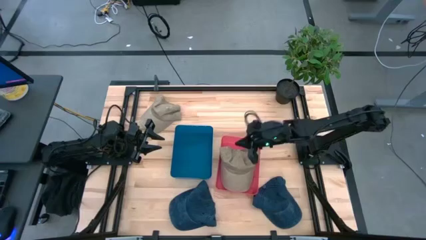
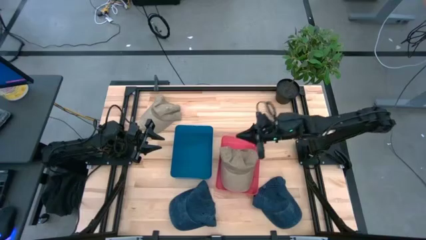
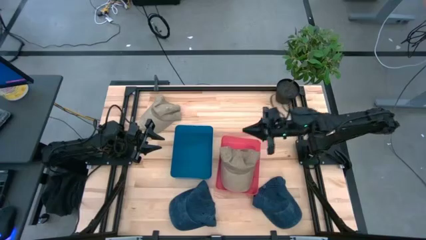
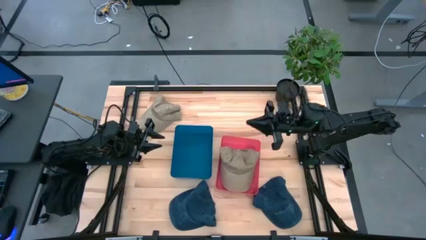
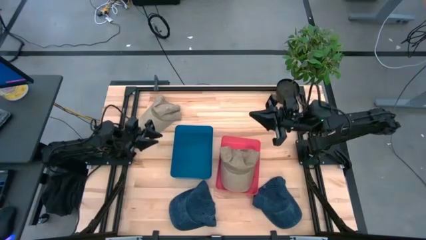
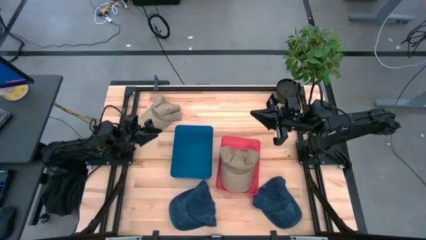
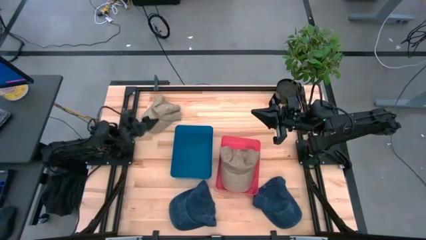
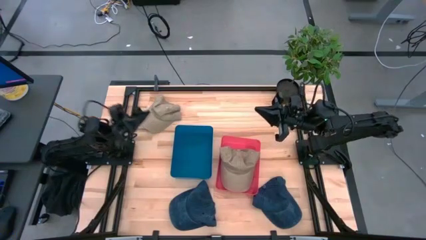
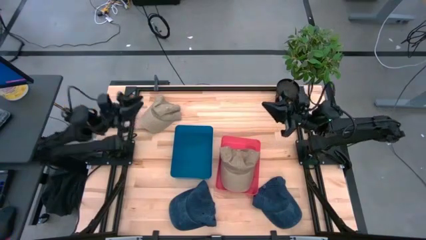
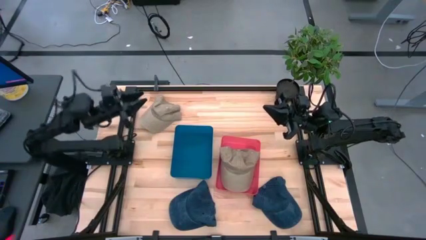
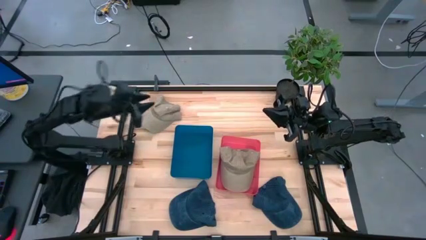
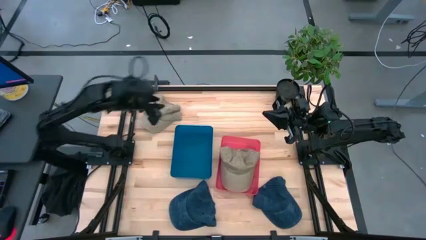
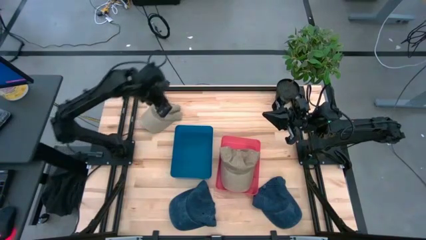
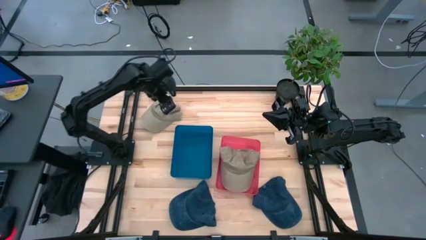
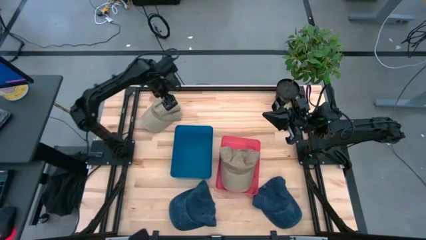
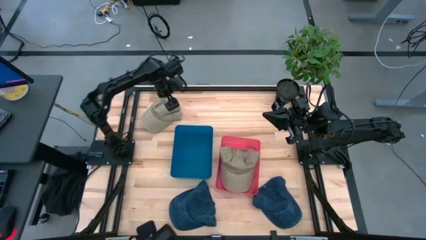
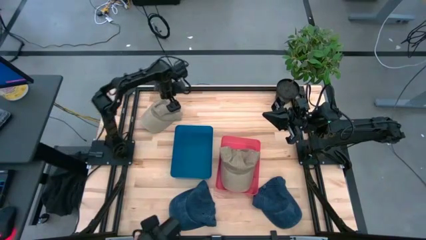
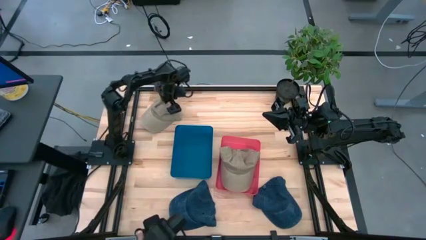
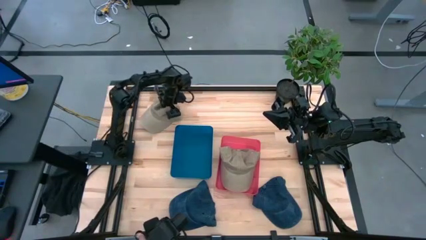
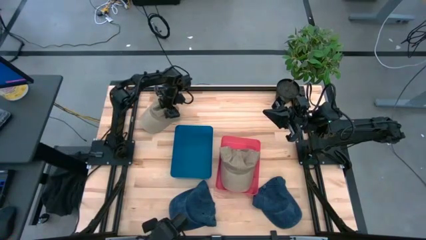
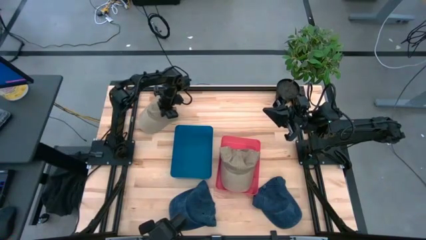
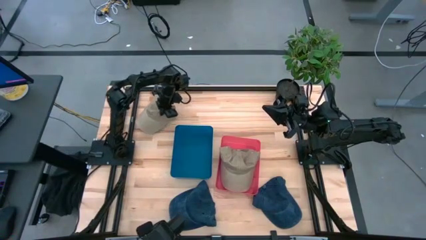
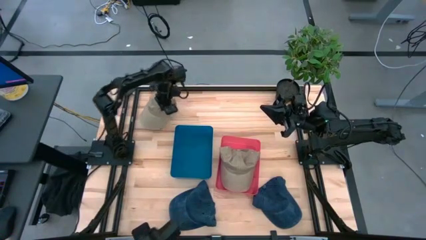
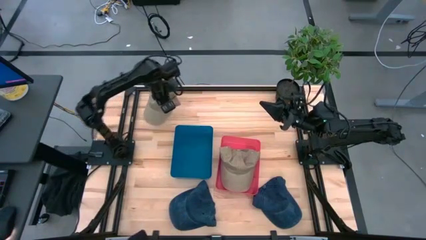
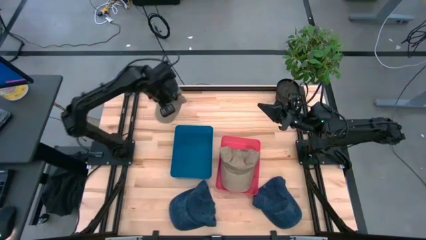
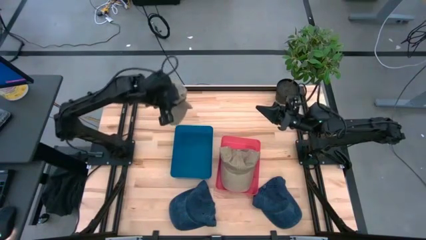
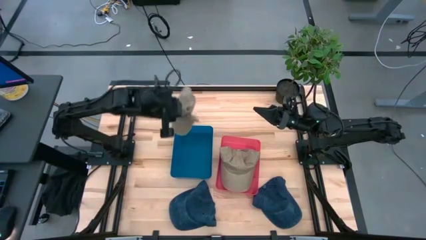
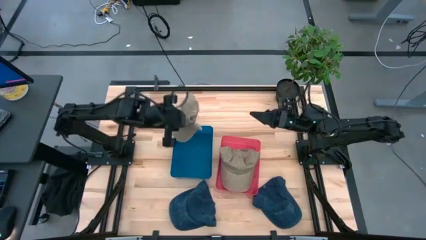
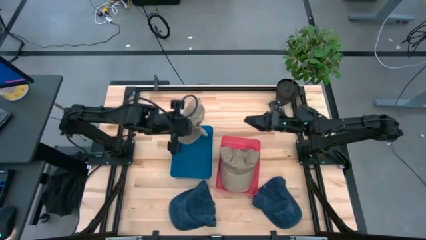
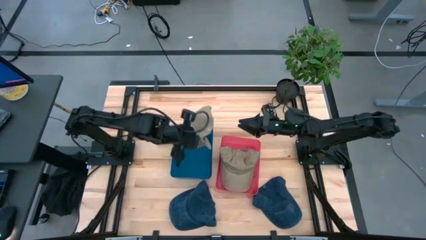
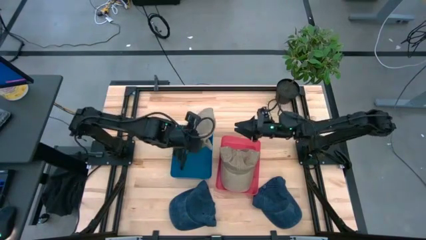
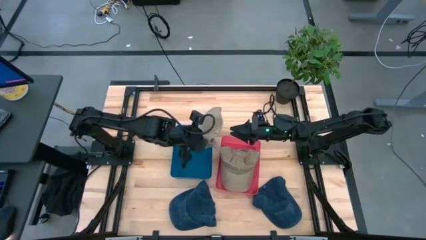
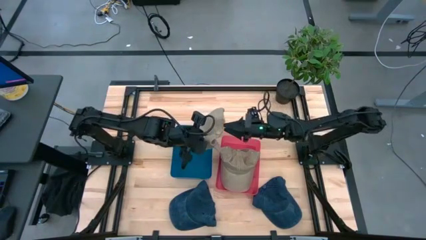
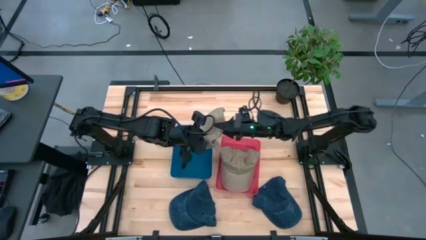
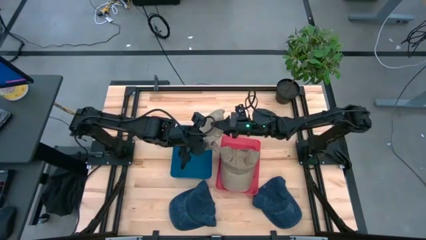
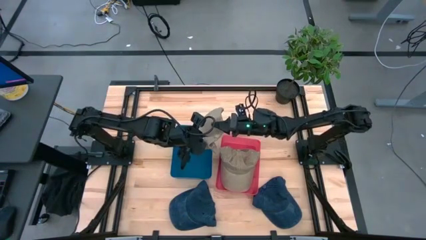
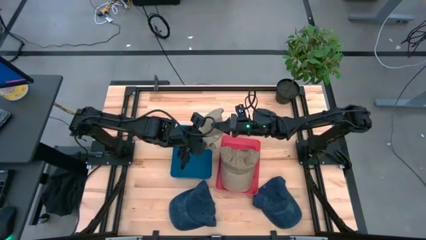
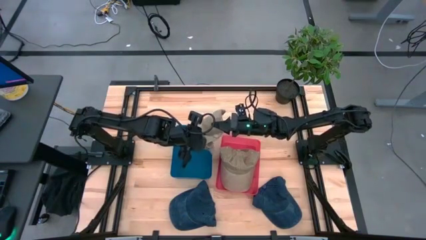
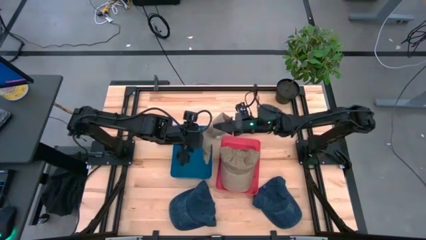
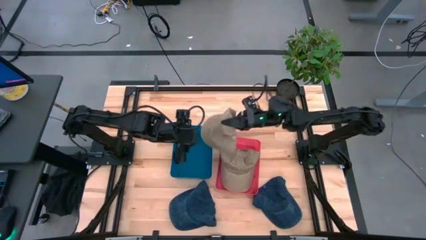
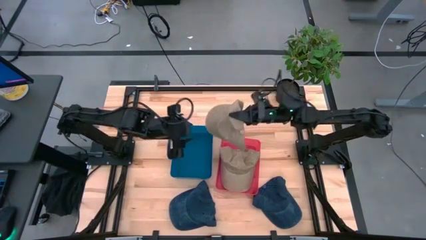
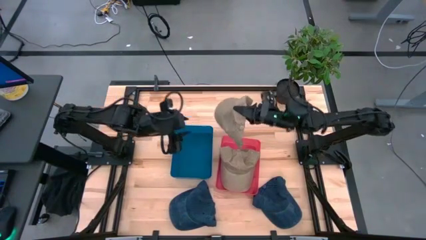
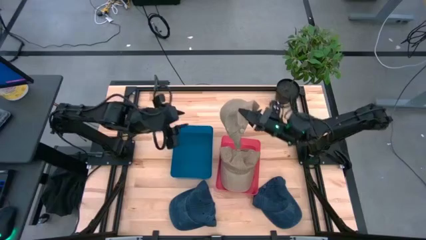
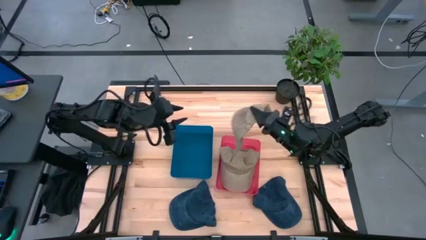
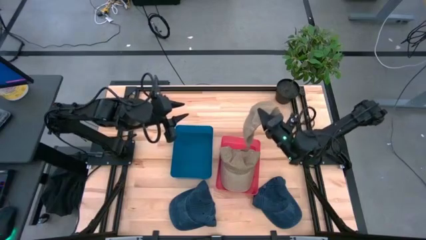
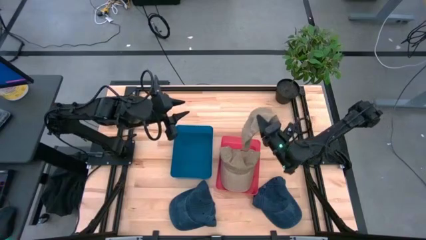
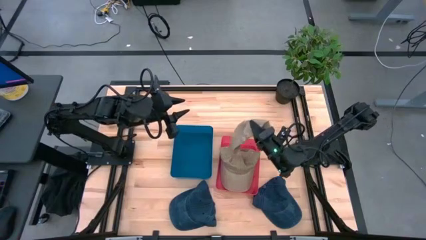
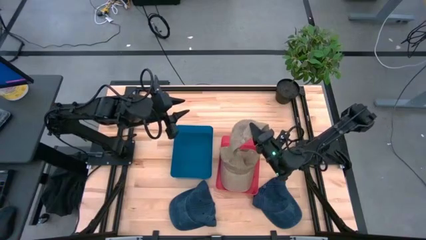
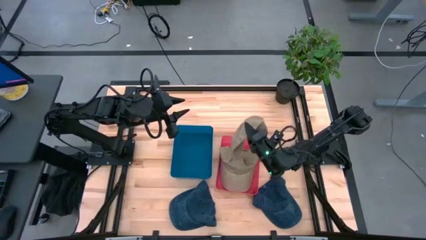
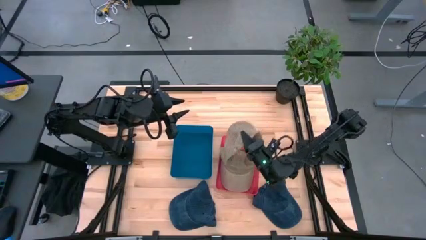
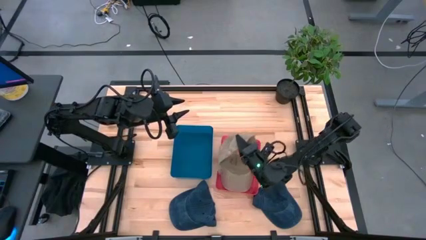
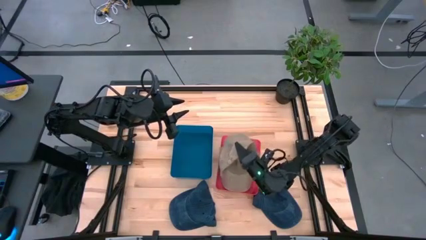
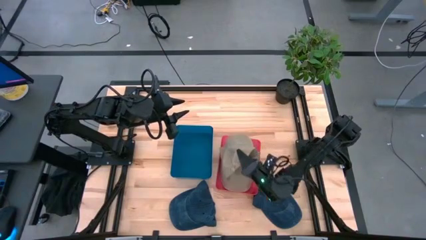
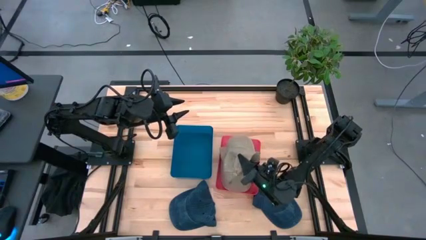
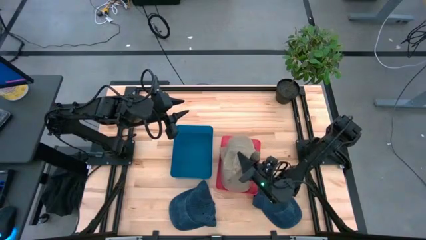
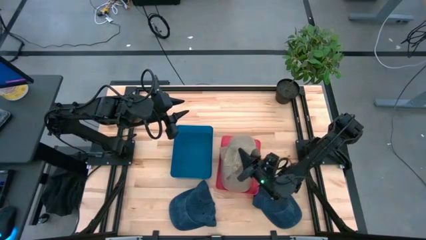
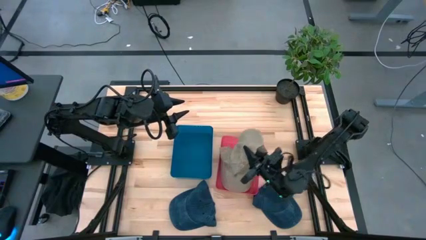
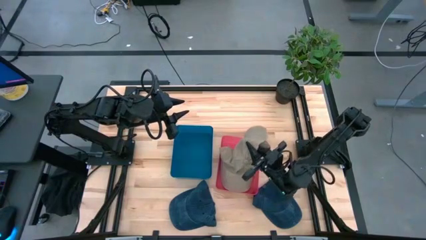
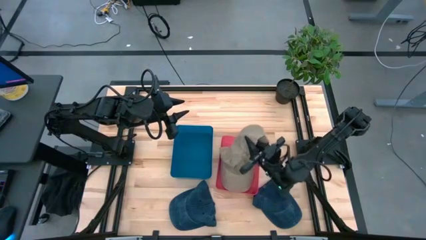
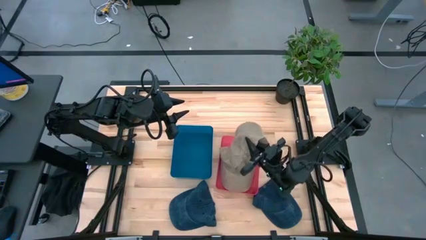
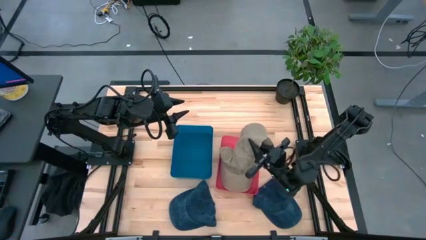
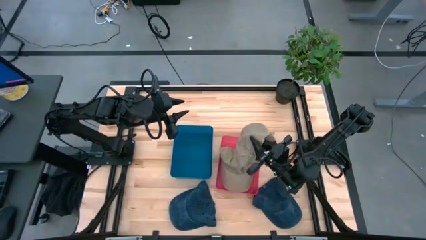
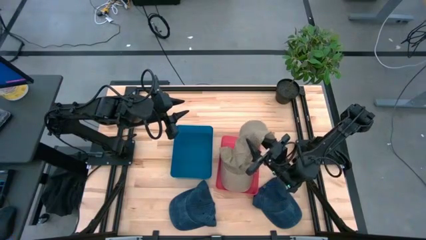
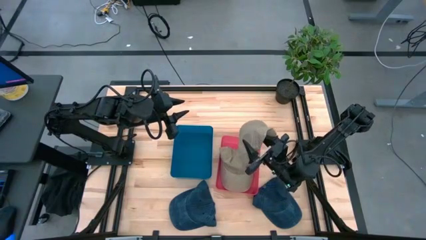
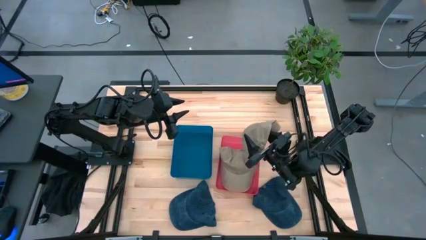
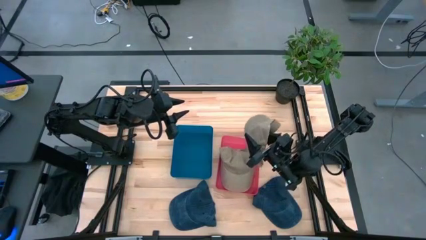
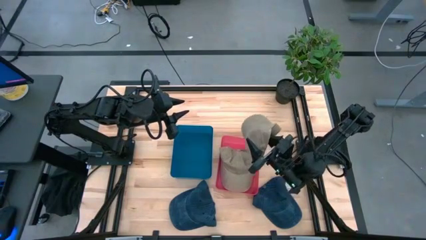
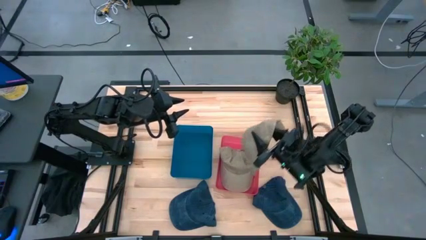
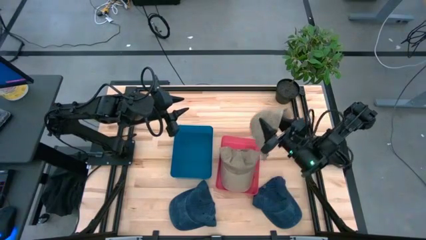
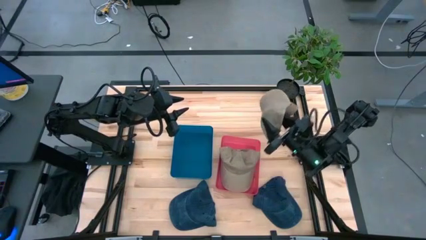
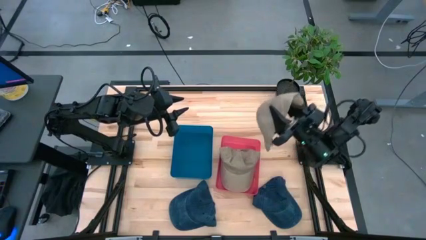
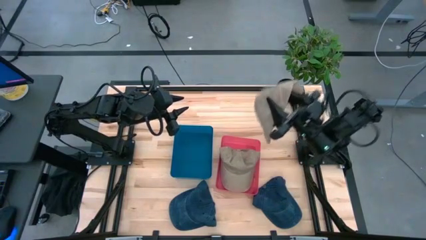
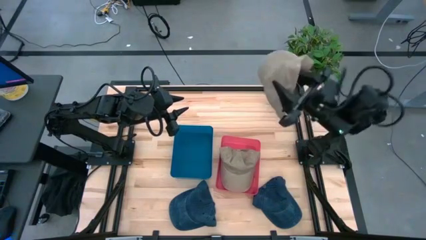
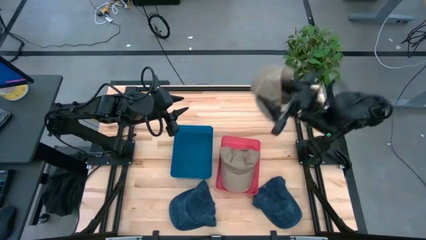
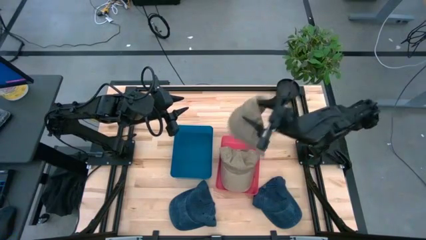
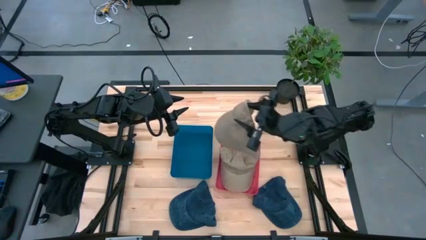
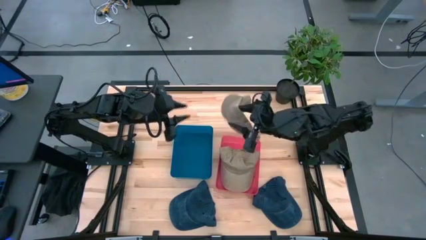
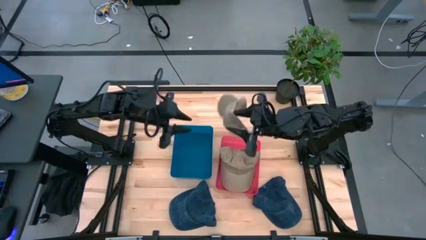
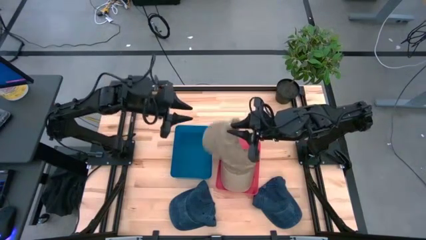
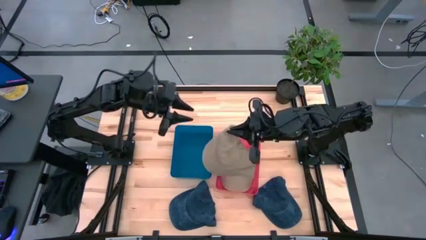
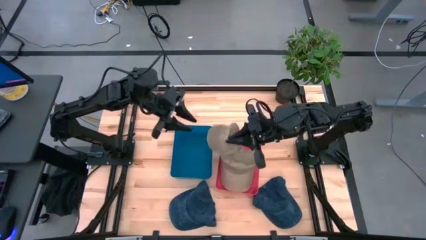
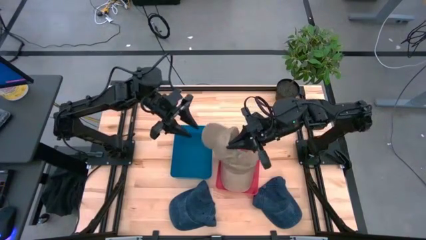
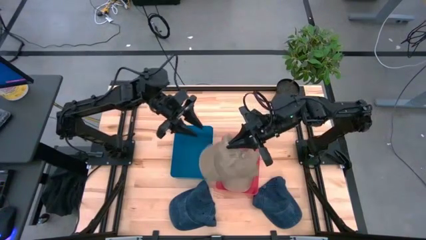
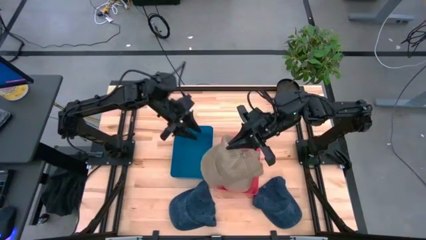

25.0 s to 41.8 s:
Task: Pick & Place hat
Put the brown cap into the red bin
